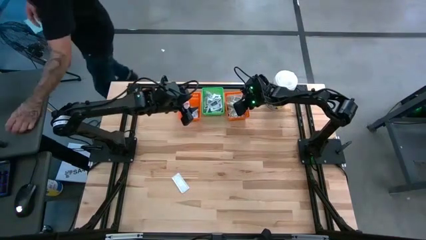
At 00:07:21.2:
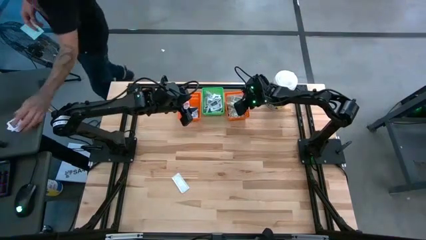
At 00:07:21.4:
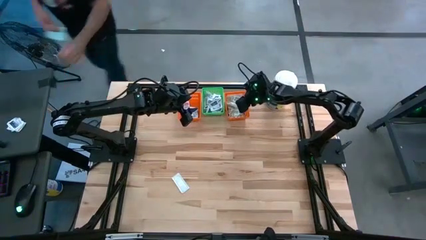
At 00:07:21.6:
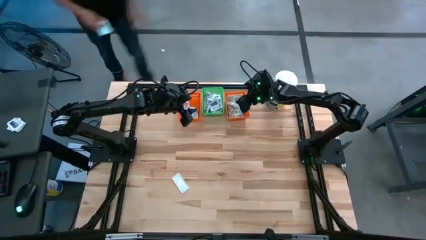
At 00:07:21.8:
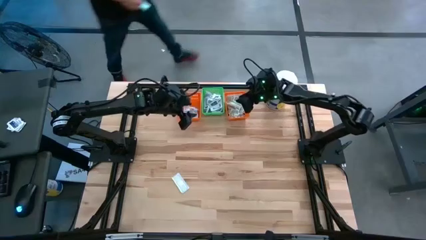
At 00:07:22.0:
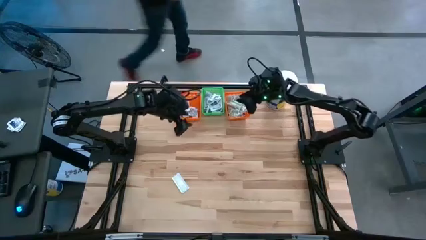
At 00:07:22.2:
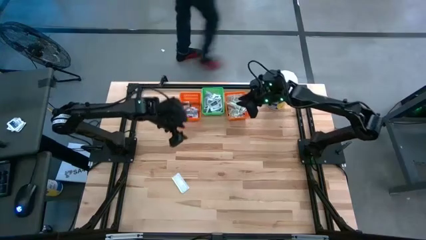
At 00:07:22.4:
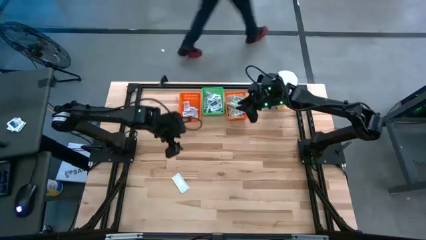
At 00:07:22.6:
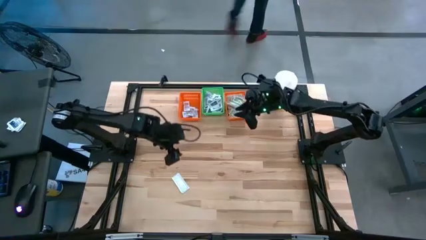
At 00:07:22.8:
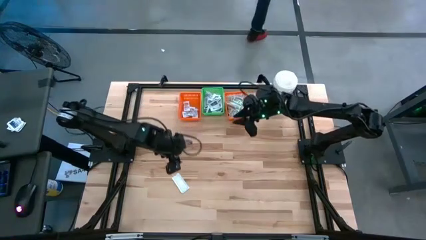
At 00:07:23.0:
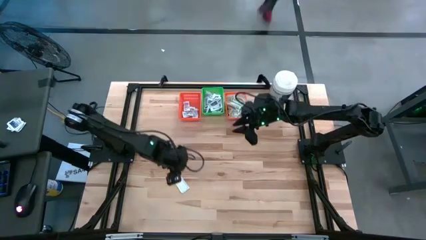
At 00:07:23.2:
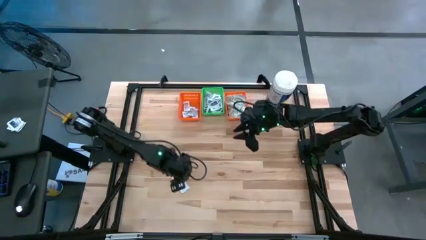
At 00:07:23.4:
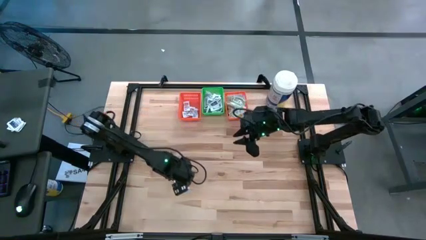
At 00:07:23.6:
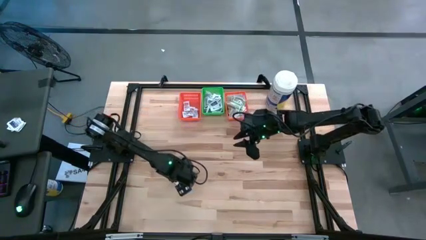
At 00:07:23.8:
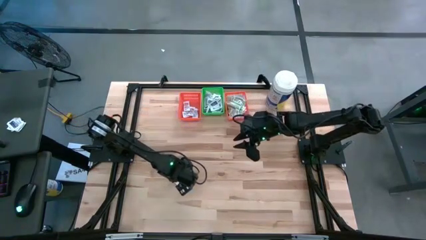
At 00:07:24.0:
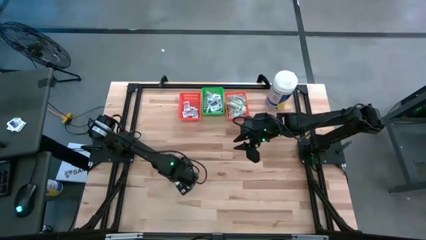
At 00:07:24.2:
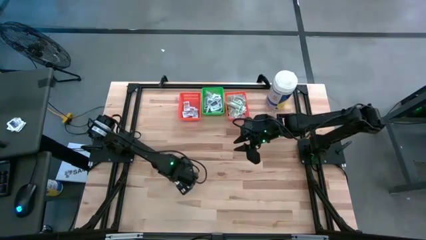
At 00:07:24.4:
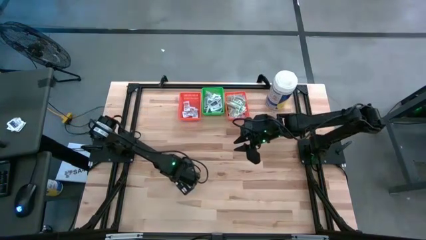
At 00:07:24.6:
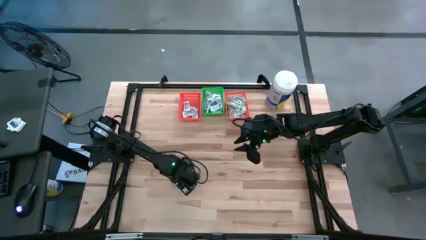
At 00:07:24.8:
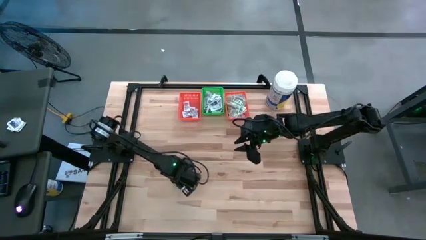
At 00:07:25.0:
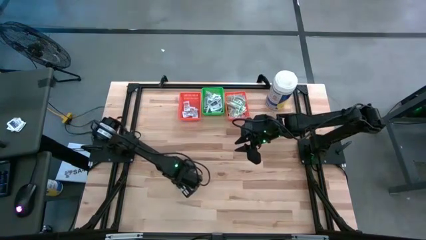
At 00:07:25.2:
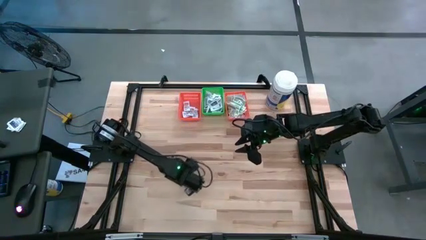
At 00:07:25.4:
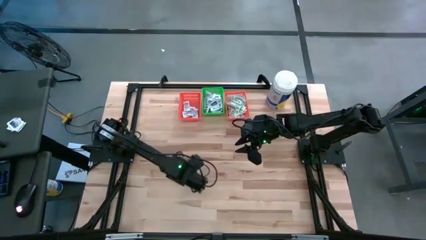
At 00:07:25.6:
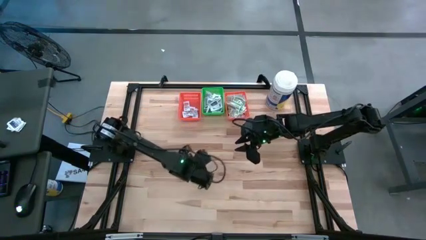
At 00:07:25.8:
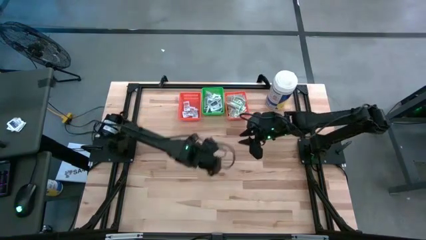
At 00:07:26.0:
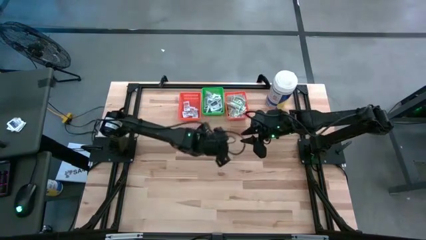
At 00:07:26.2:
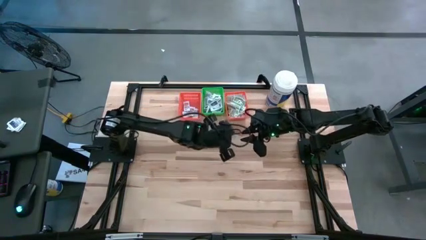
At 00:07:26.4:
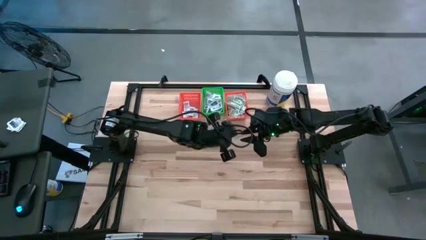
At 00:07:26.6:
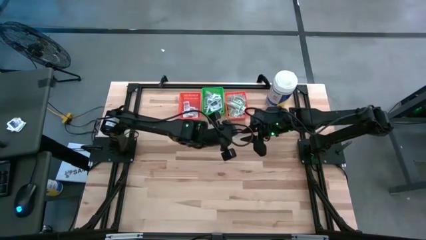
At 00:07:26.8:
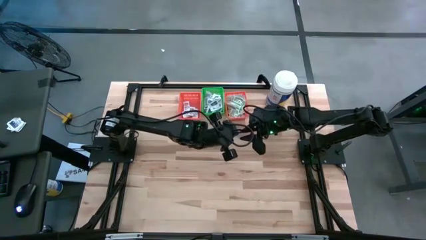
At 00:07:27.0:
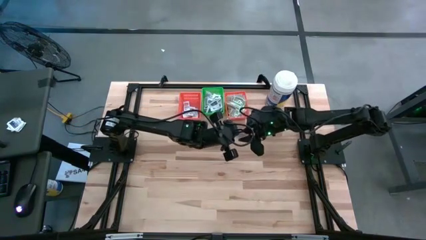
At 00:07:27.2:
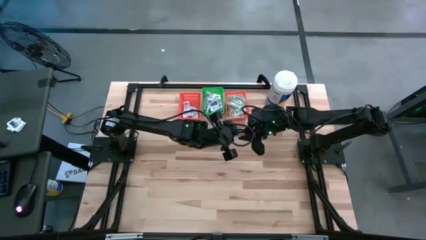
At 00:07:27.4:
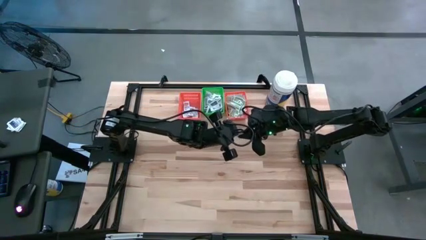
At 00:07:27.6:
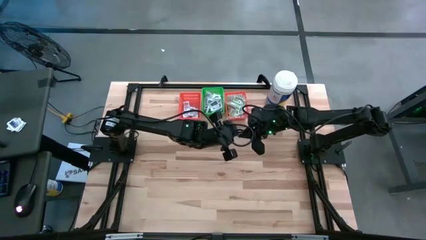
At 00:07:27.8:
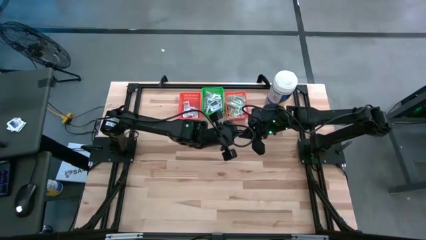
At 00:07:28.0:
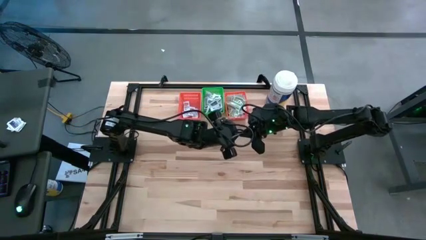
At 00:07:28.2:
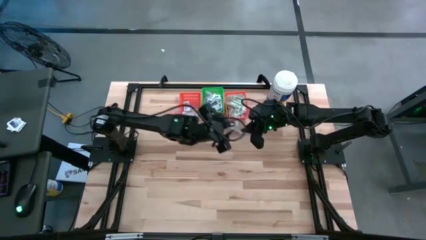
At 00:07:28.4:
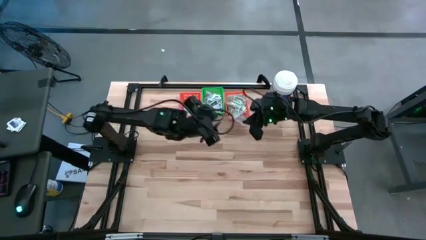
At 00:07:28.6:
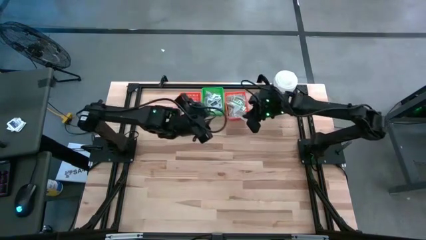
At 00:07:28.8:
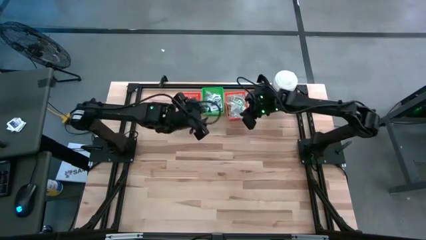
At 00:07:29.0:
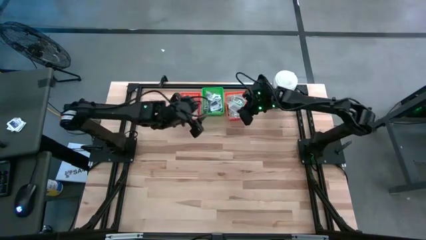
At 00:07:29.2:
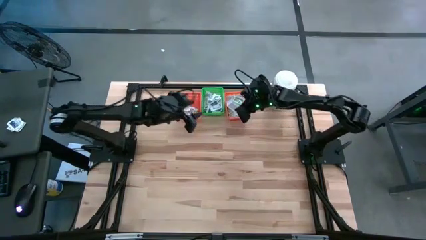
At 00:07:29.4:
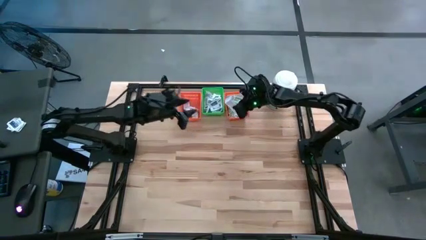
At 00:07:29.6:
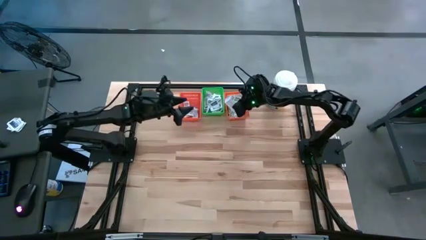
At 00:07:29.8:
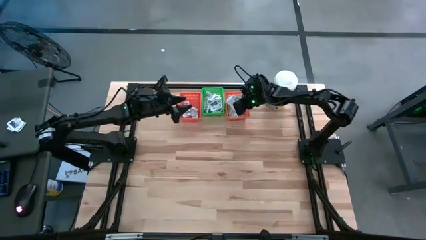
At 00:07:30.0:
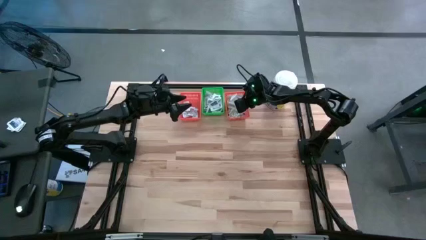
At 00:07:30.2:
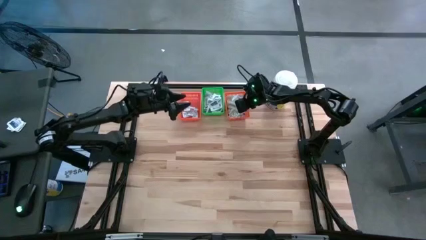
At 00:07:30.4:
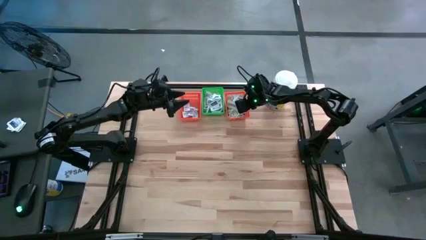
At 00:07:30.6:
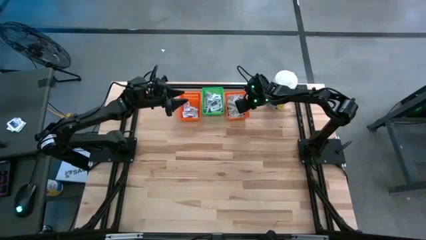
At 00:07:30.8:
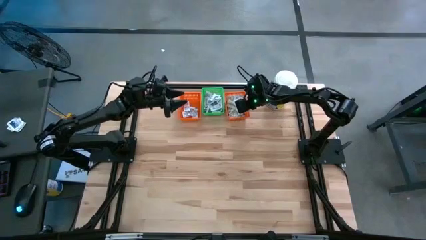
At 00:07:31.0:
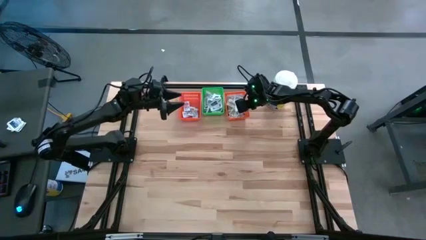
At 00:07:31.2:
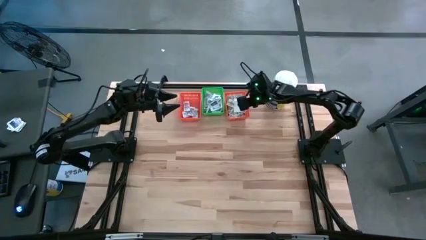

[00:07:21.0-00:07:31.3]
Task: Pick & Place First Aid Supplies
Put the bandage pack into the right orange bin
